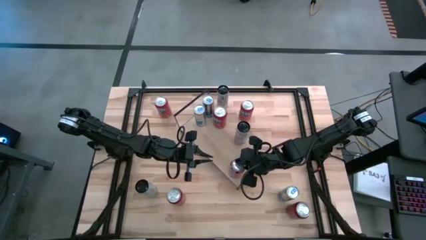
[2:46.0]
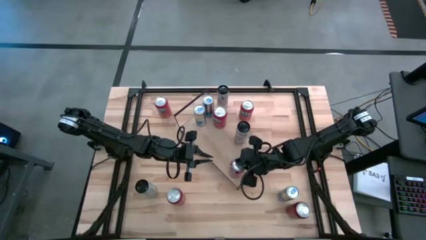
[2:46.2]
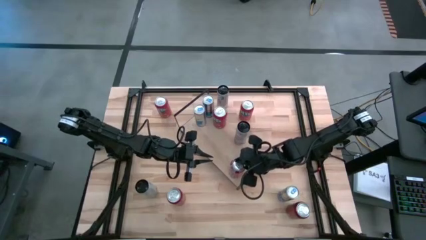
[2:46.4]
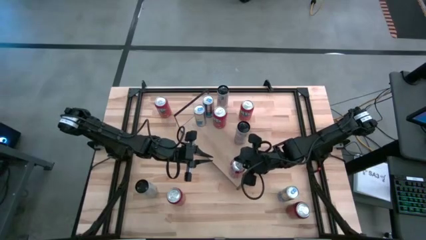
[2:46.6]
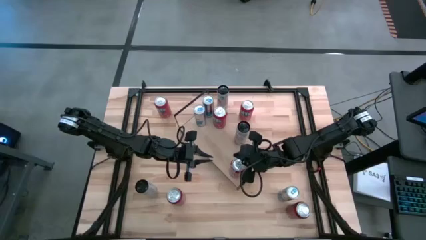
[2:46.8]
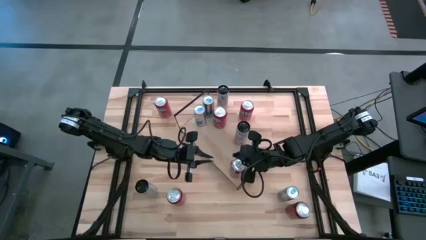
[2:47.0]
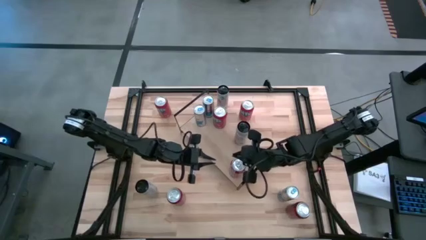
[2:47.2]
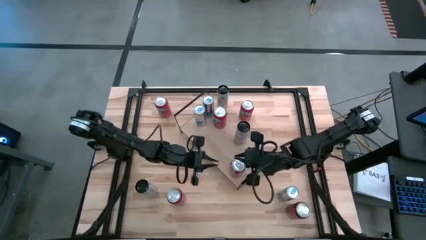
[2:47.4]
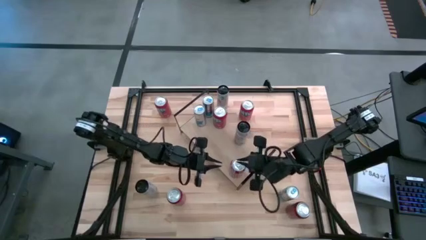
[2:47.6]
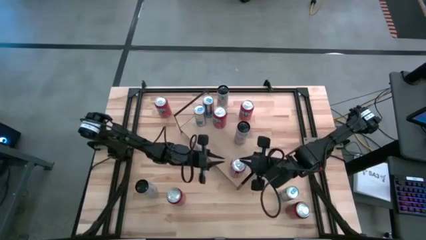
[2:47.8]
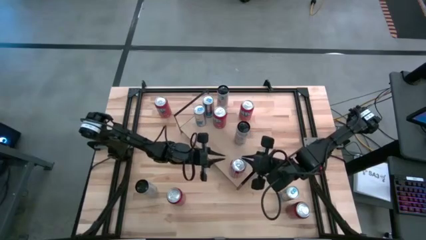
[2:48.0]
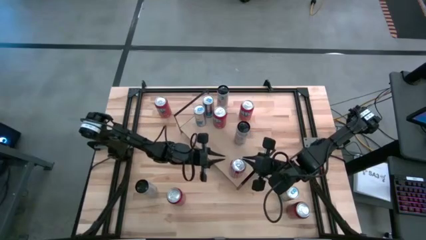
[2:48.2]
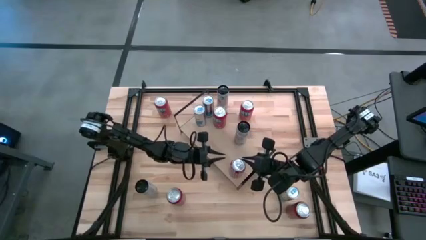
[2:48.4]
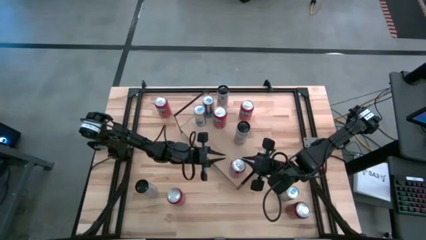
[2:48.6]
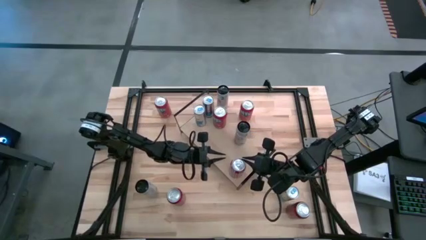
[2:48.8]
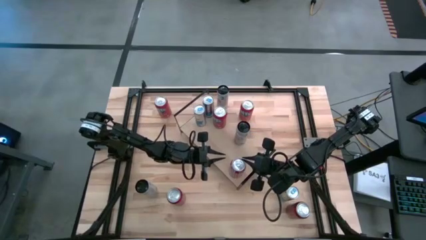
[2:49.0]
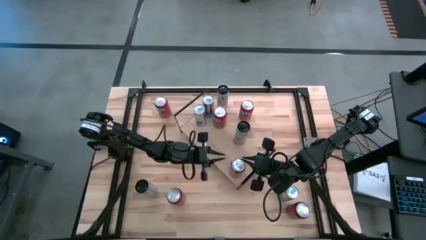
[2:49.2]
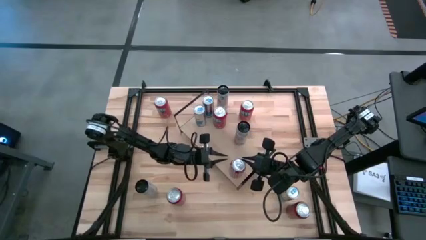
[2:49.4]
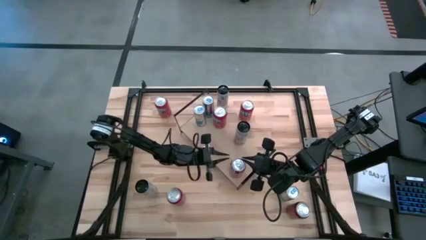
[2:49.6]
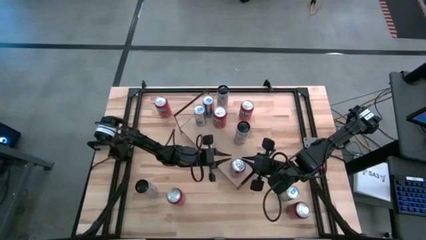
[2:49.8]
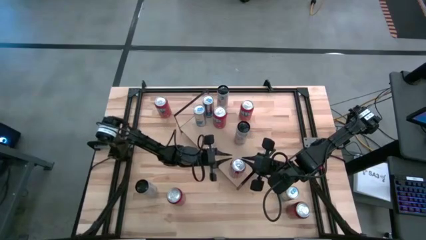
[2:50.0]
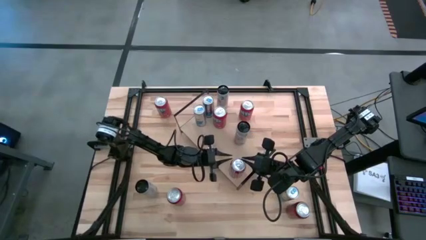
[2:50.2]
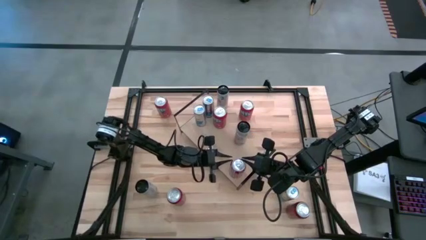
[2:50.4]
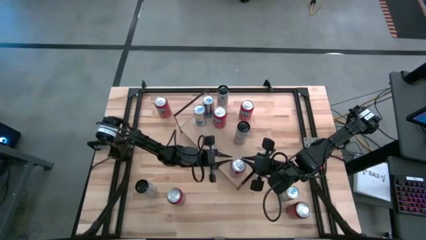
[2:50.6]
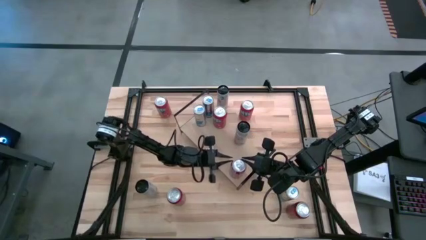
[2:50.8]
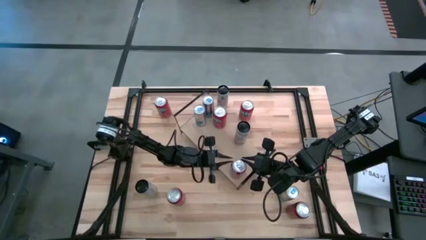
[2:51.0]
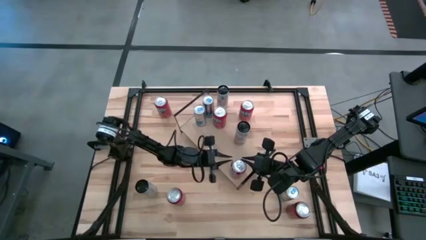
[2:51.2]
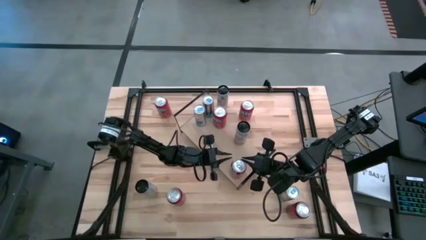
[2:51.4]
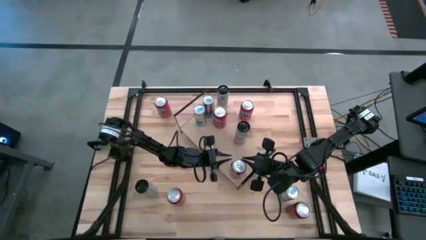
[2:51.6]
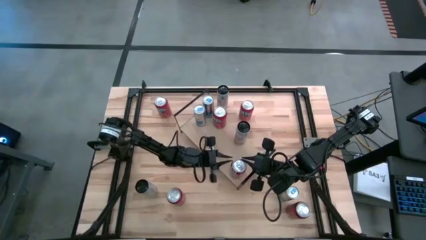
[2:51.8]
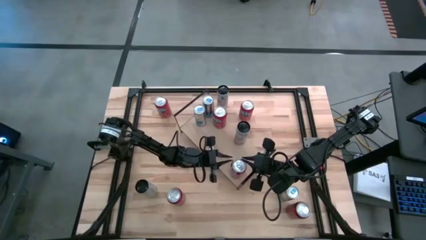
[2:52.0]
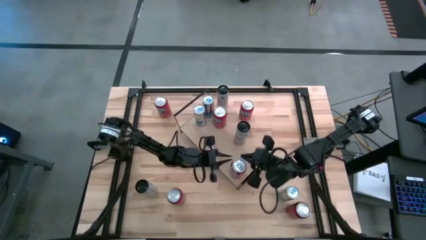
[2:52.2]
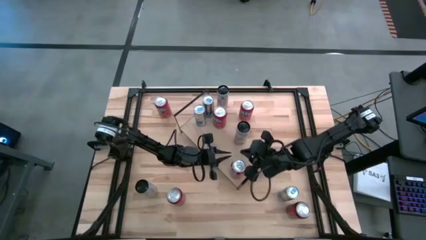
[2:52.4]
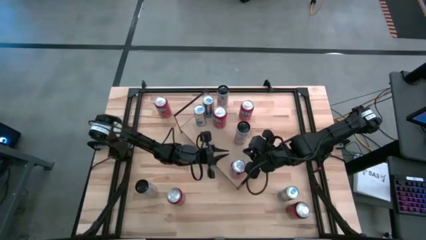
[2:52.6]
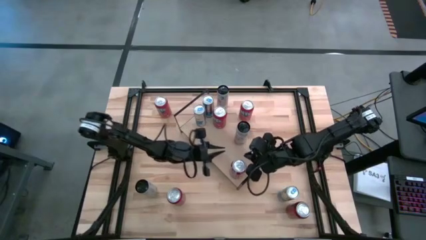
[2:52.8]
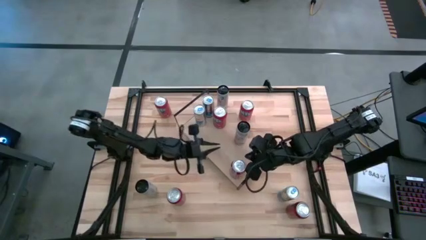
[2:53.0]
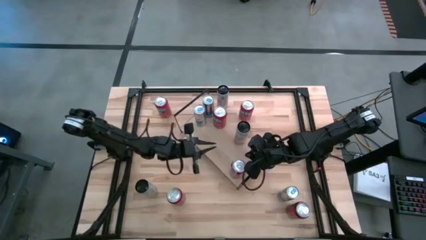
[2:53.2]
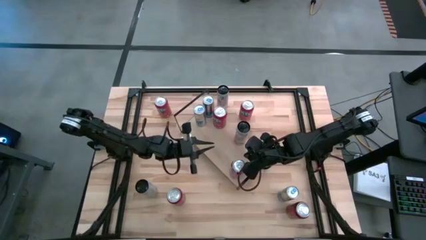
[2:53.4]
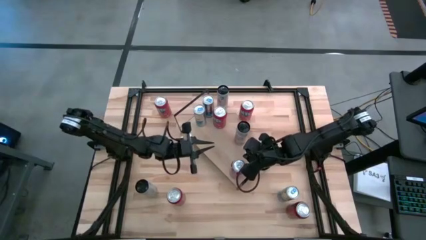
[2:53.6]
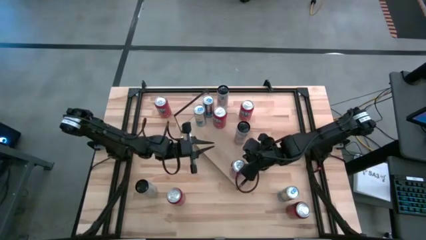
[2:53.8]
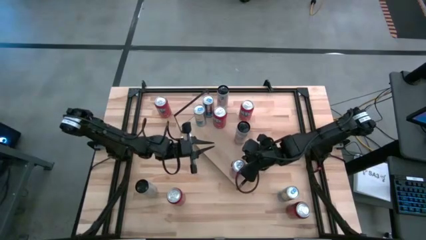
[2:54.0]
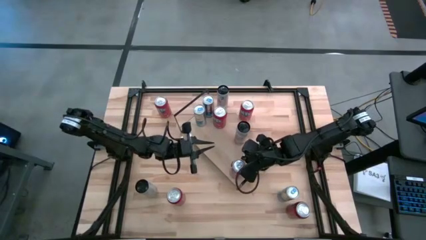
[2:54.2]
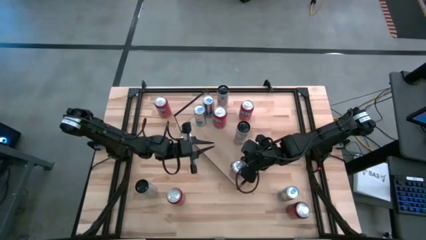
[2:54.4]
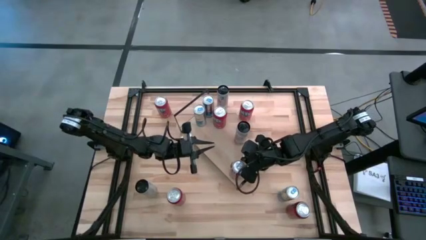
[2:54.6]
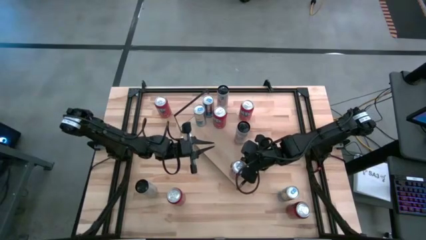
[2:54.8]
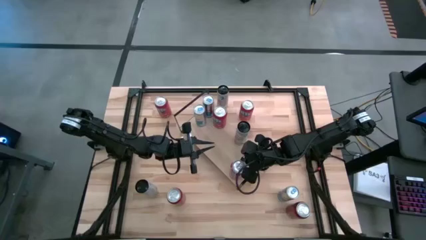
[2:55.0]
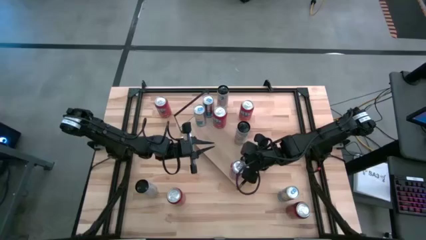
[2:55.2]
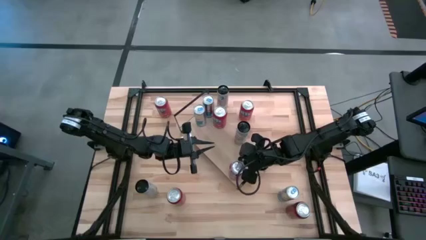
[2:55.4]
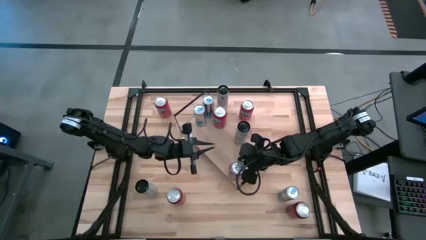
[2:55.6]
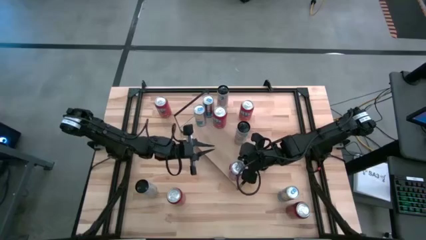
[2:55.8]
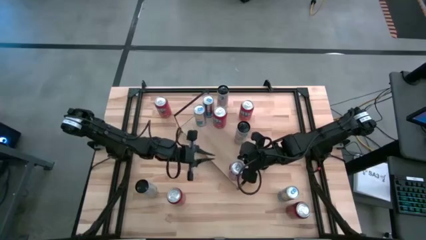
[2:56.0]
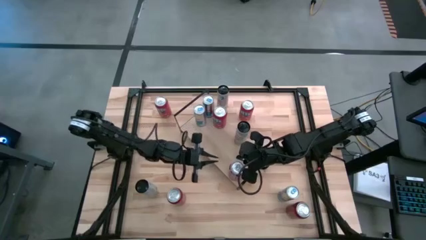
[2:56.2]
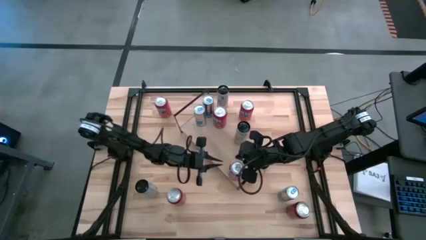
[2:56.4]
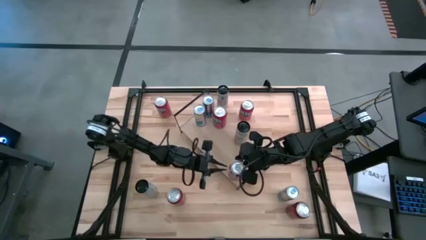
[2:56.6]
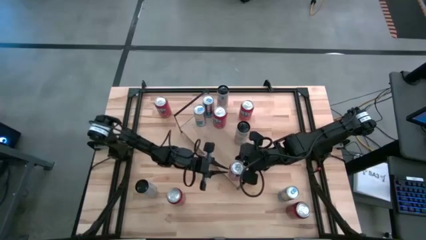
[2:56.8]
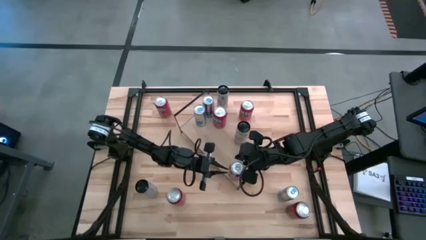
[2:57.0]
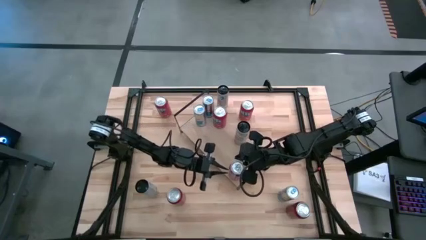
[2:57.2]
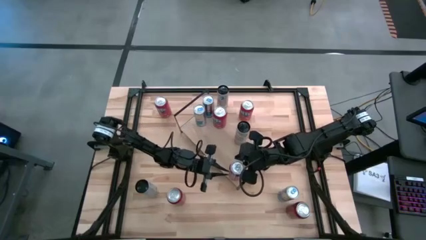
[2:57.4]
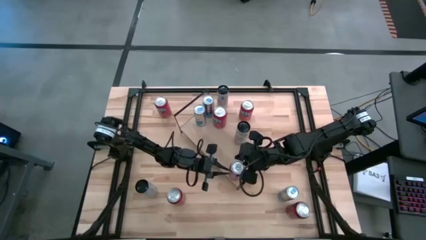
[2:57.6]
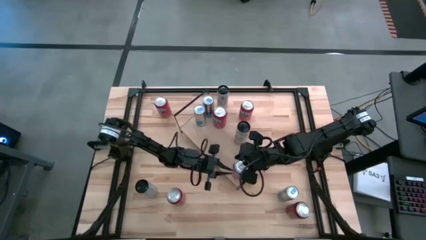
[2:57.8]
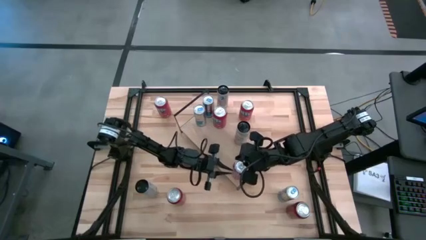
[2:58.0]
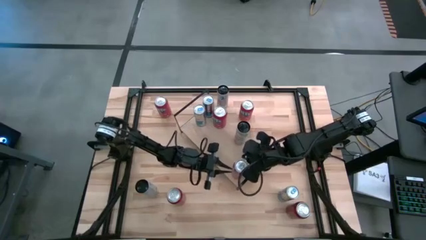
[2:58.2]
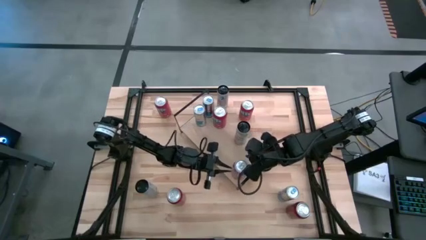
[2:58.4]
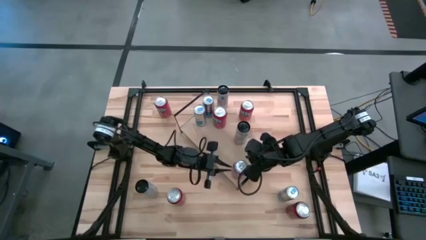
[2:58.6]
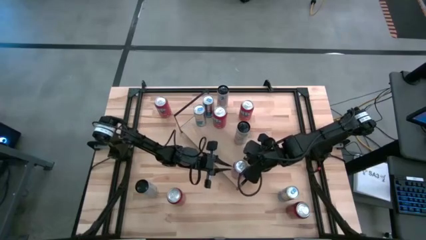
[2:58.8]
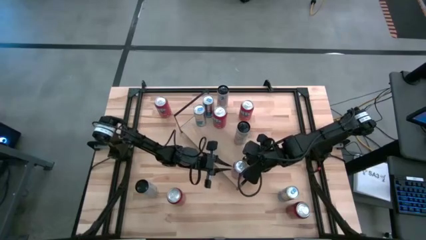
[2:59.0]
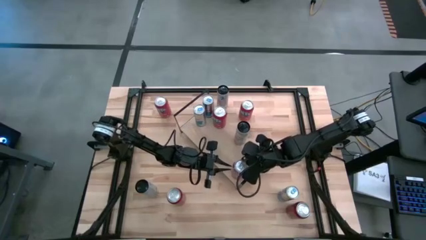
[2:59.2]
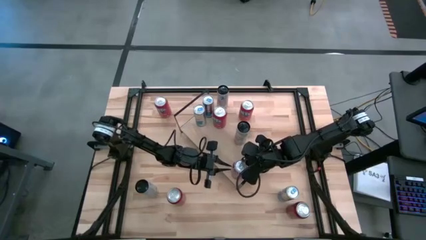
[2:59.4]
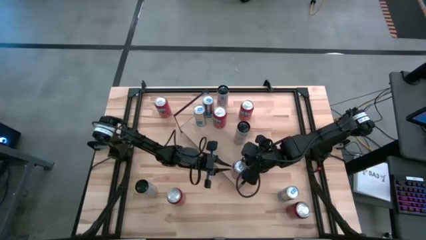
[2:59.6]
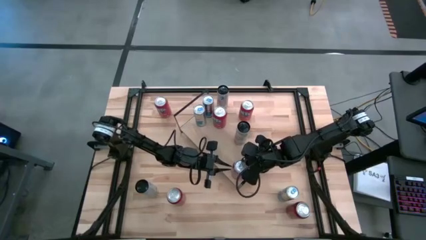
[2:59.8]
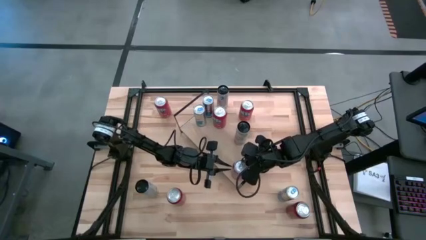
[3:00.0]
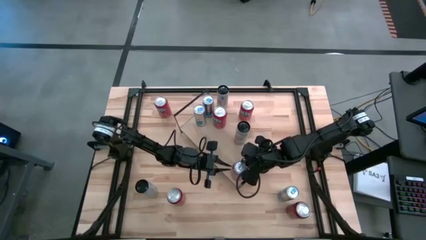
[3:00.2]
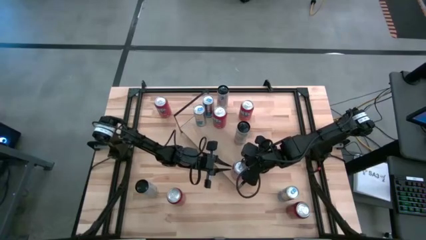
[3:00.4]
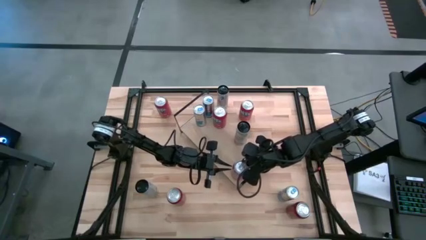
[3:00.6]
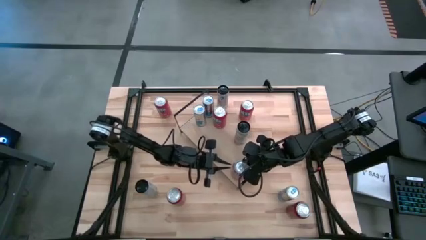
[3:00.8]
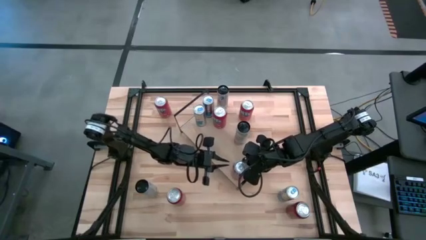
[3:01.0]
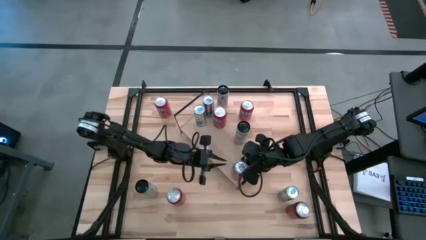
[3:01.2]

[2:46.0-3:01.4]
Task: Place canned beverage on shelf
Put the red soda can on the shelf
